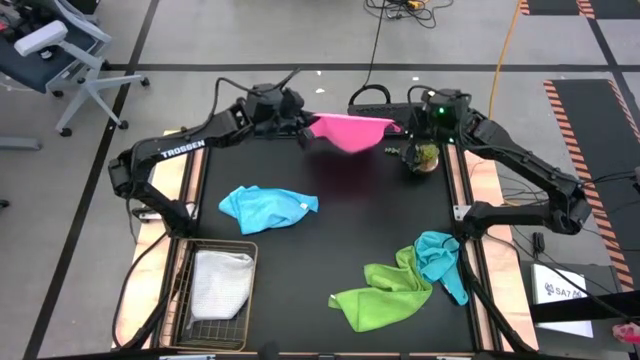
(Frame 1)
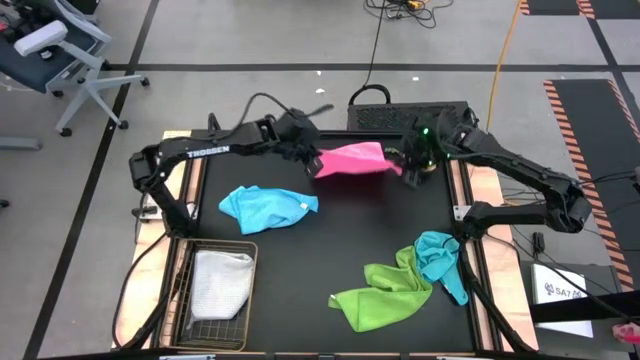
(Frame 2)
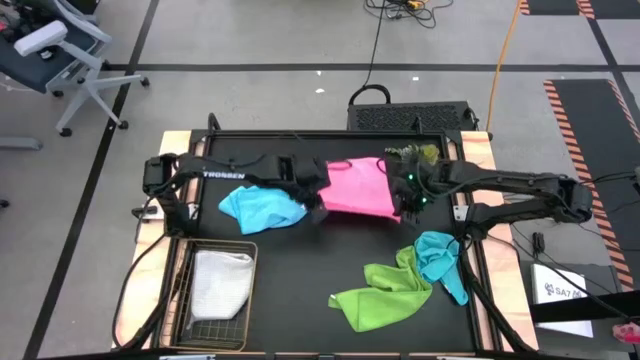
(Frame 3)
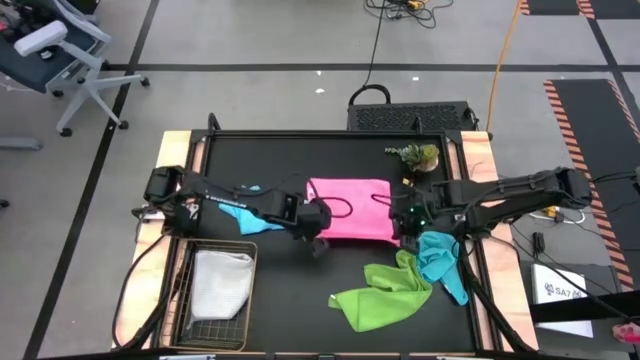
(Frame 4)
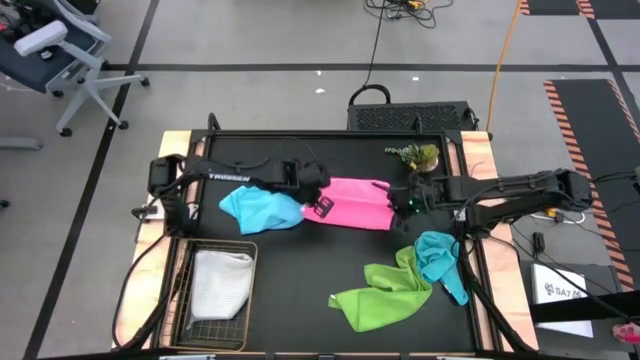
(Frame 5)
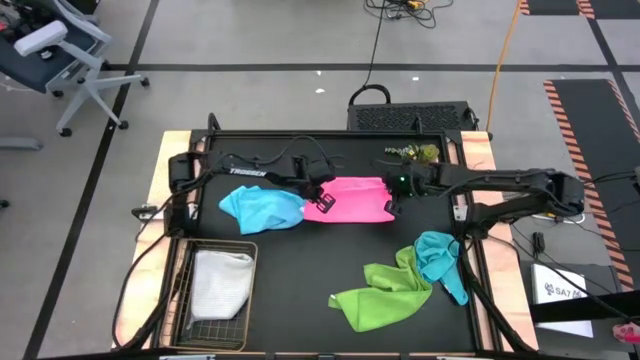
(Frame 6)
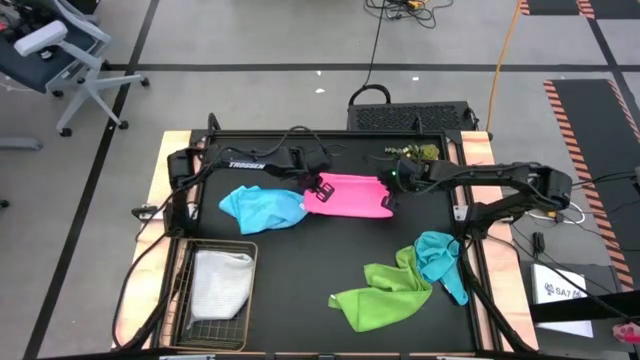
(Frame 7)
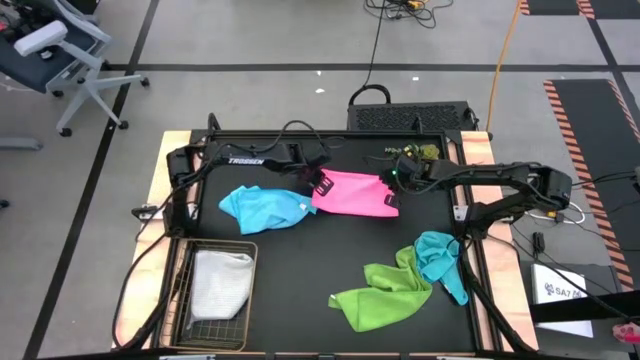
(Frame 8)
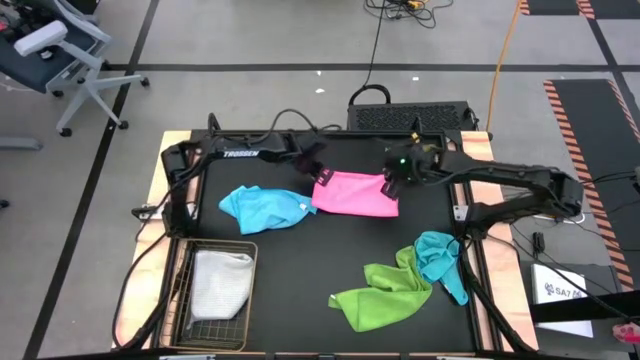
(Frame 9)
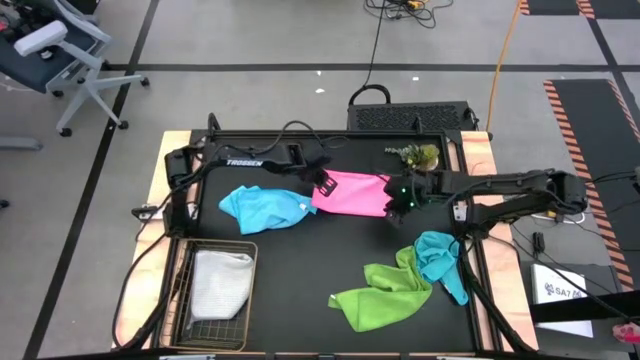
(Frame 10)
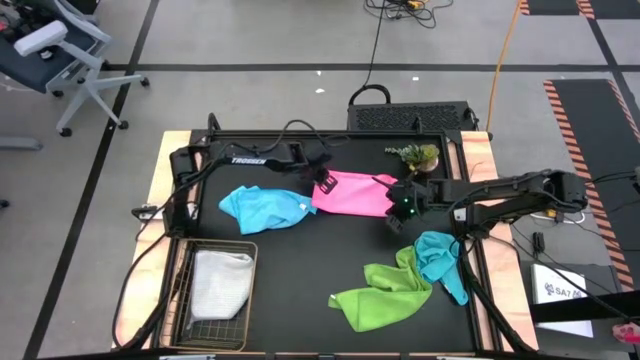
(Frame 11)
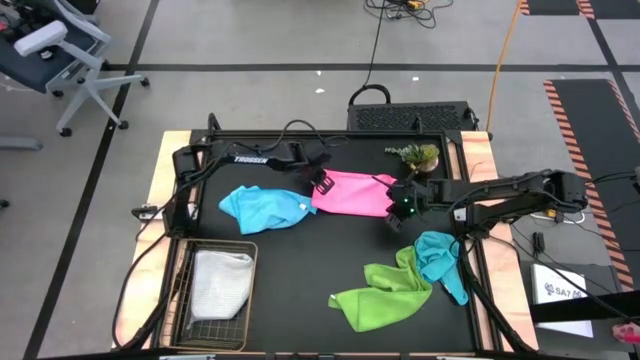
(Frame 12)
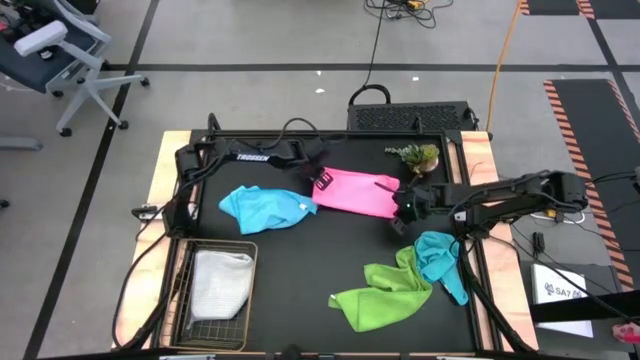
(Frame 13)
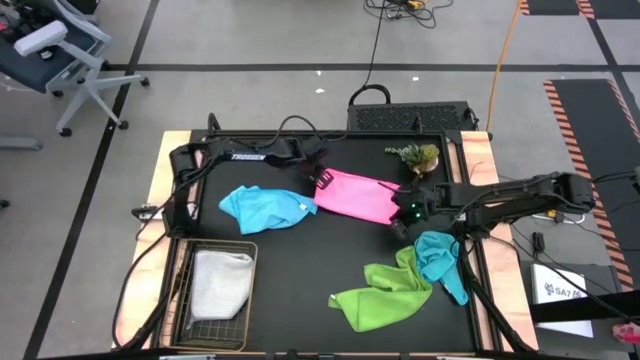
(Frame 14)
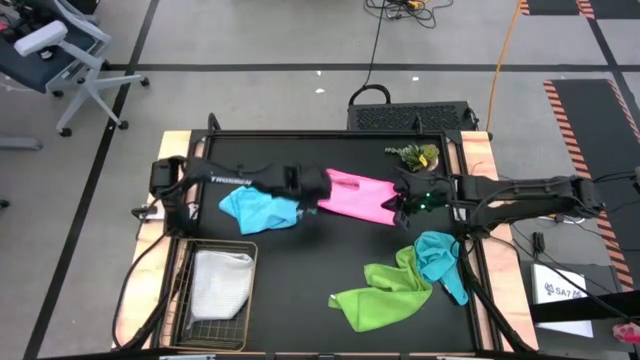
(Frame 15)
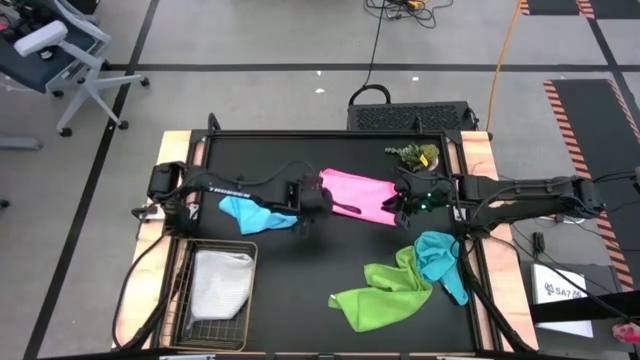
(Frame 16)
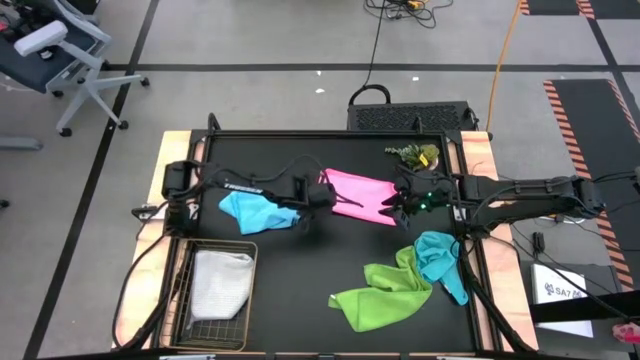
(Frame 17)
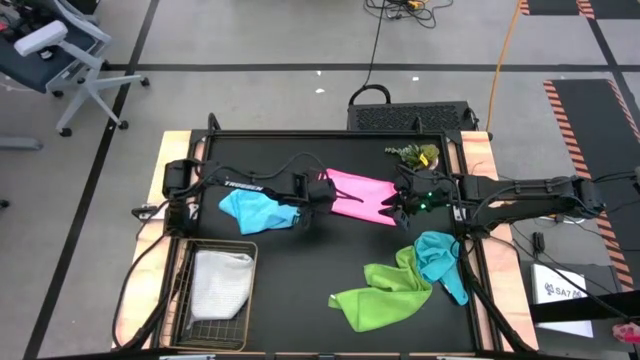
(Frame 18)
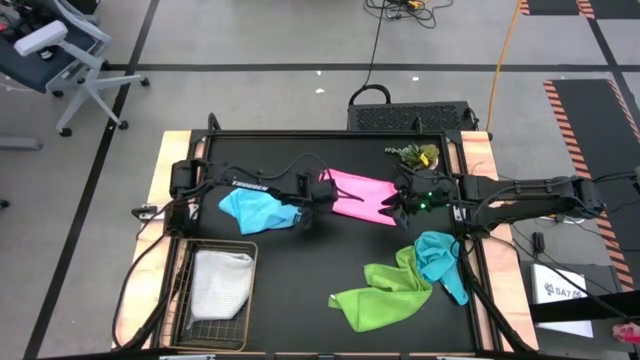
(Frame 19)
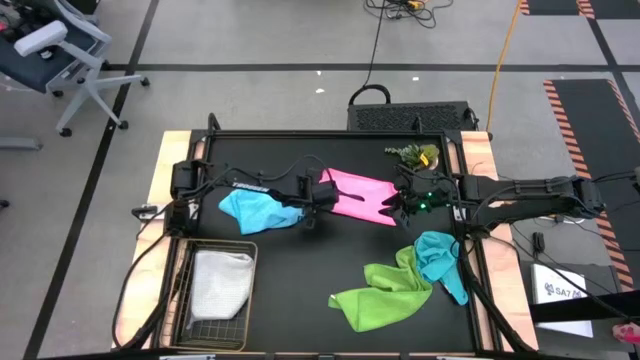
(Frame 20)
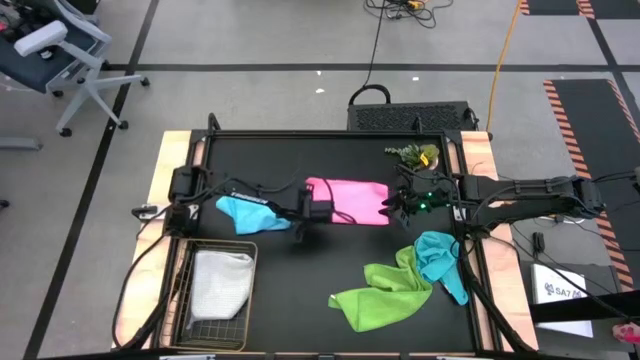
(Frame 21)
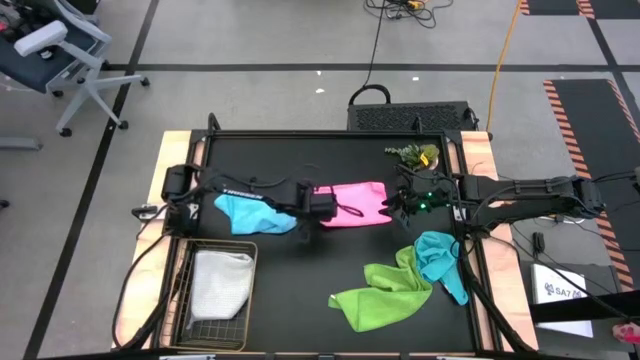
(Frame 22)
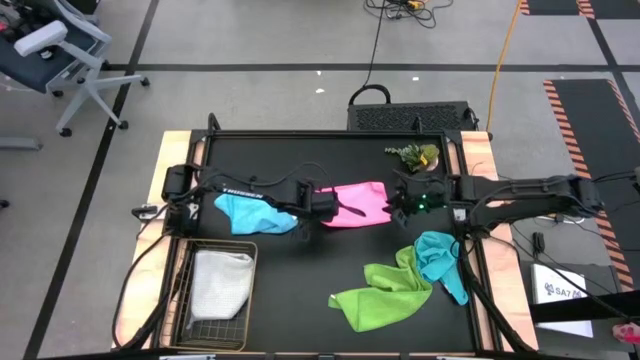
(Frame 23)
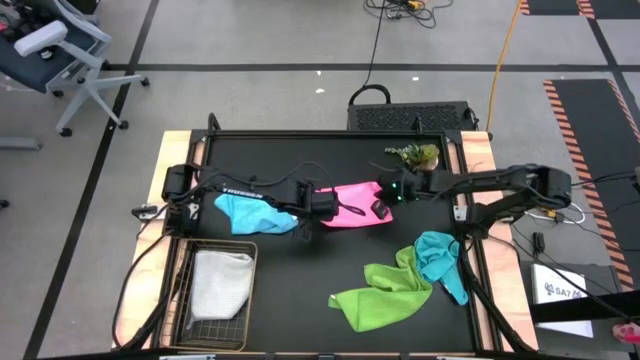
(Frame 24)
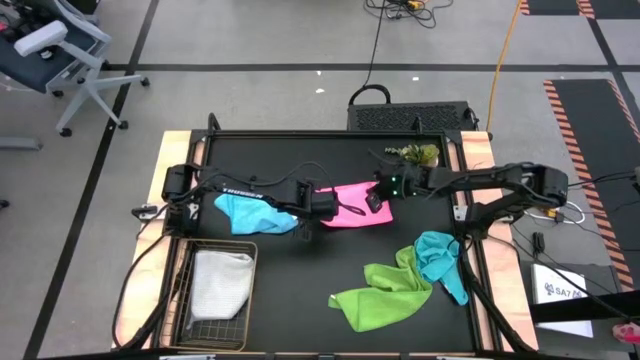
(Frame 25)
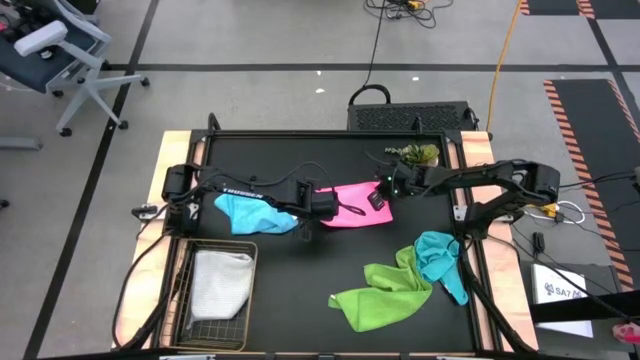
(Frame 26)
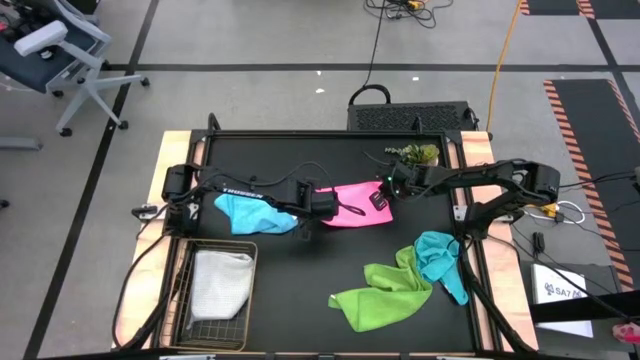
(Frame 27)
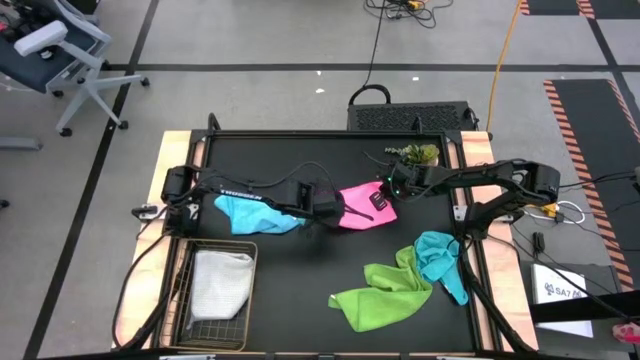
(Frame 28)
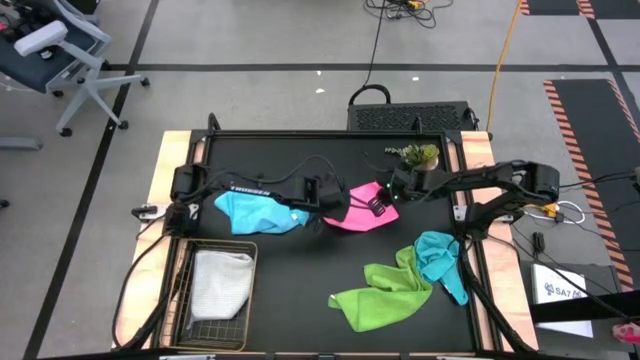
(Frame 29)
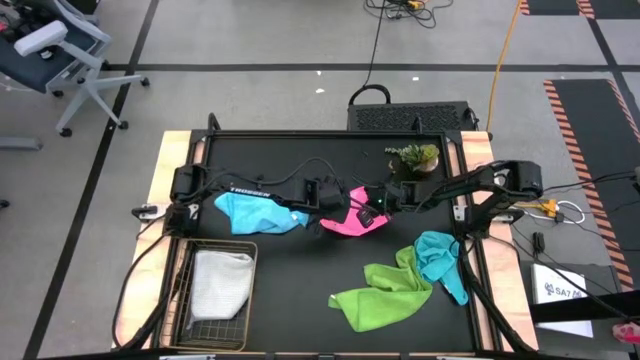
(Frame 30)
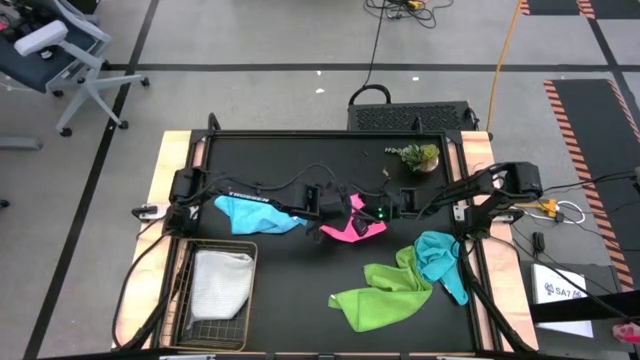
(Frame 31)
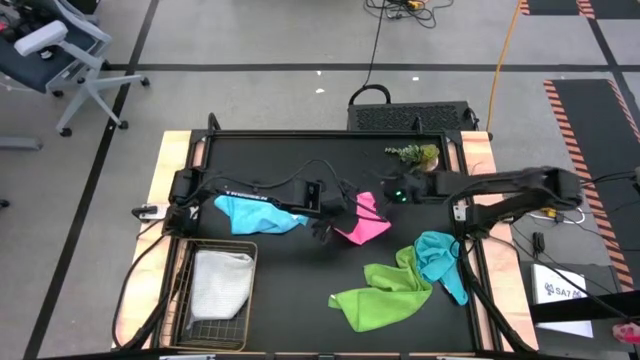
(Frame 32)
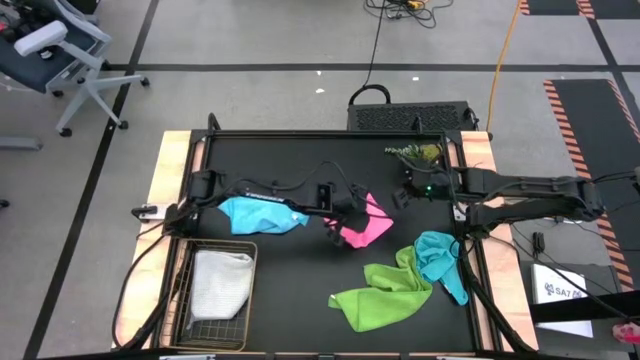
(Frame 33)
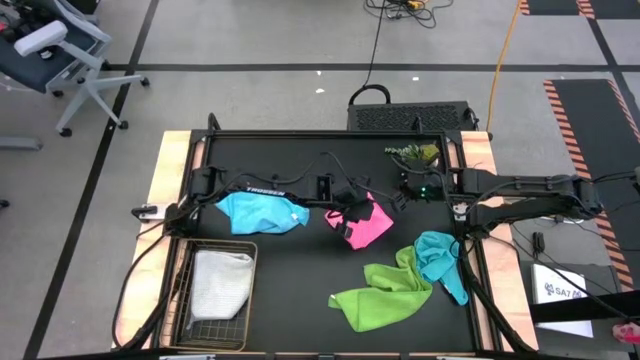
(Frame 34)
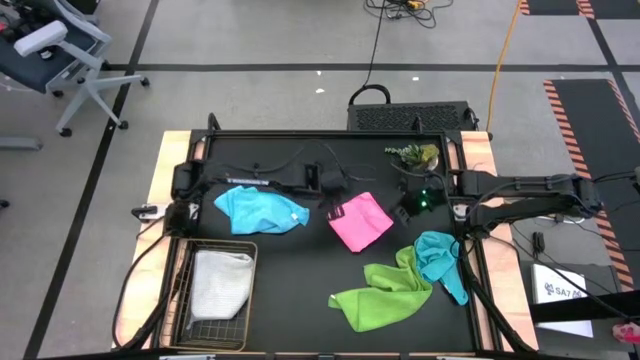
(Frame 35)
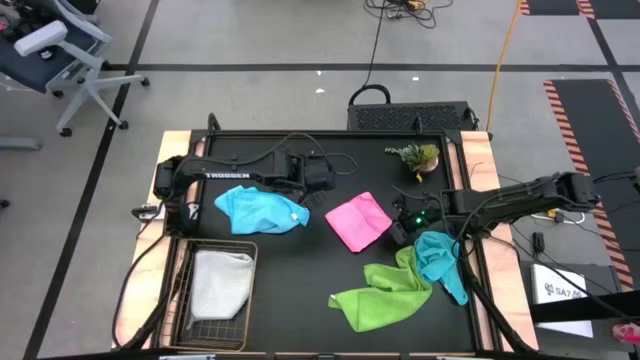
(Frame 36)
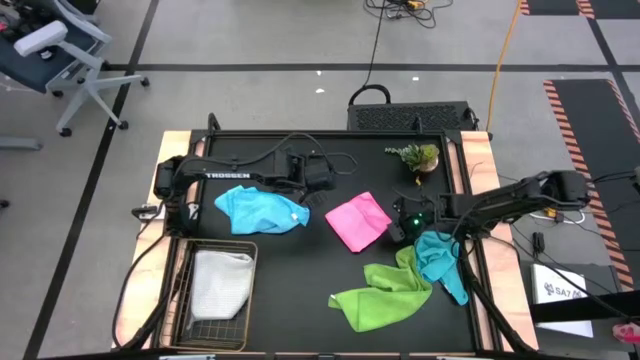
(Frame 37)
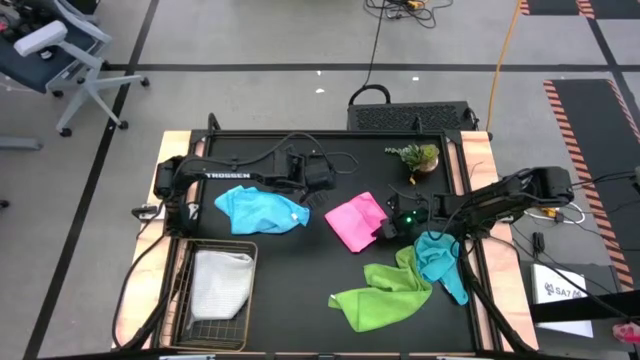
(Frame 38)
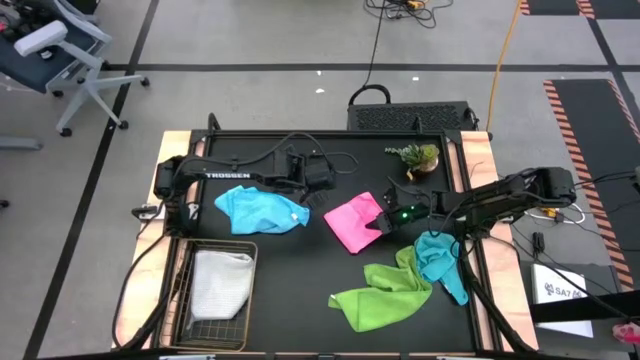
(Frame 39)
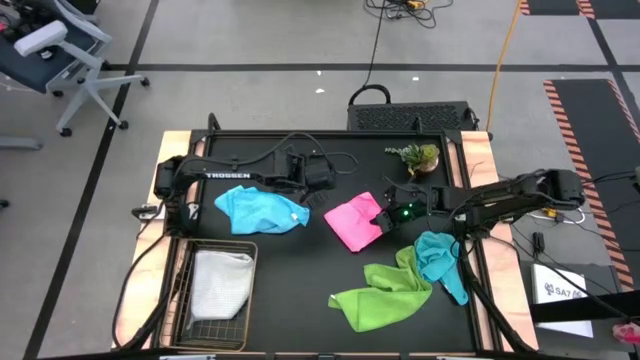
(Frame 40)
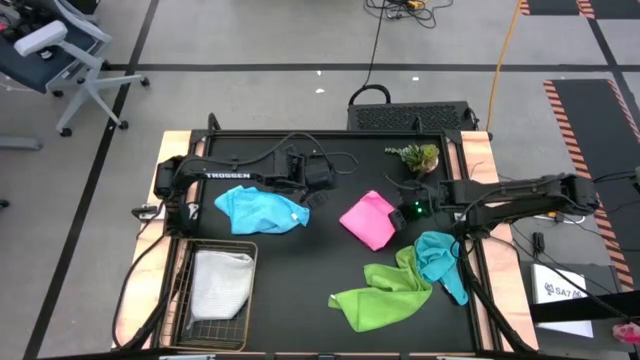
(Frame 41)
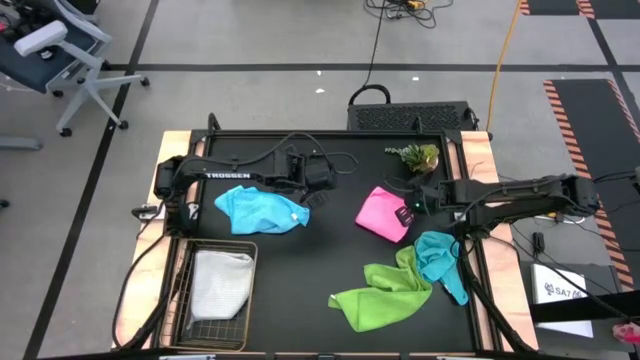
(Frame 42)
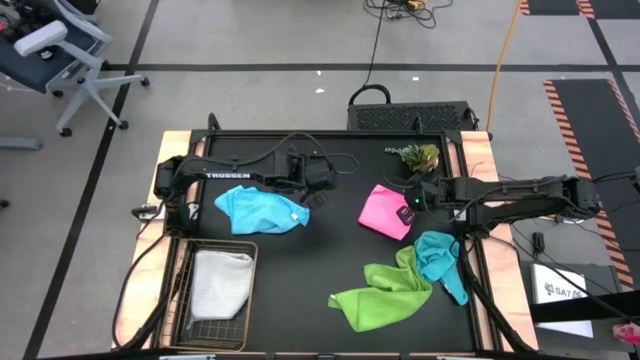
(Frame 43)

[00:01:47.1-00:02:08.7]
Task: Fold microfiber towels
Fold the pink microfiber cloth
